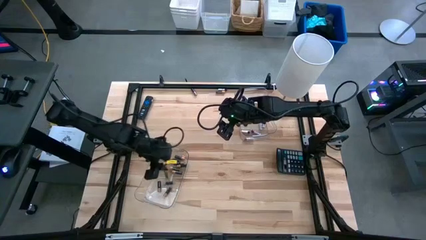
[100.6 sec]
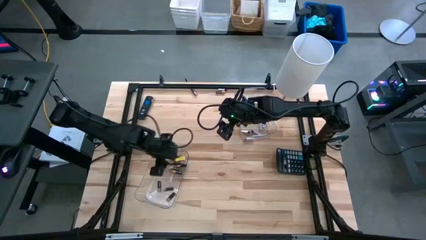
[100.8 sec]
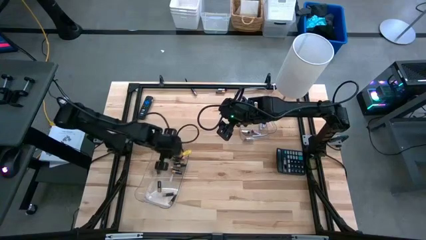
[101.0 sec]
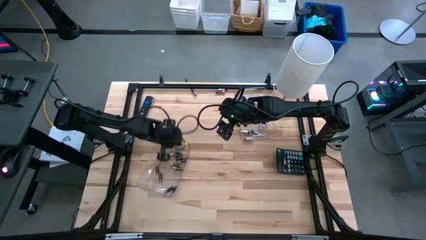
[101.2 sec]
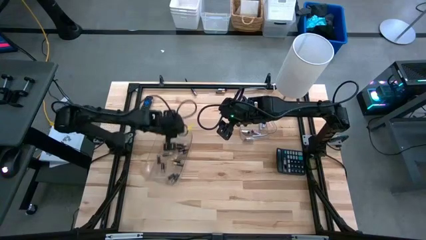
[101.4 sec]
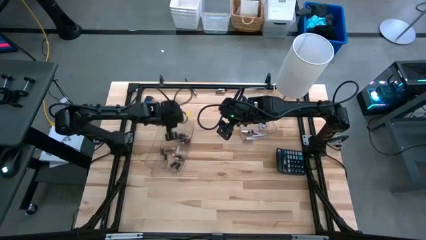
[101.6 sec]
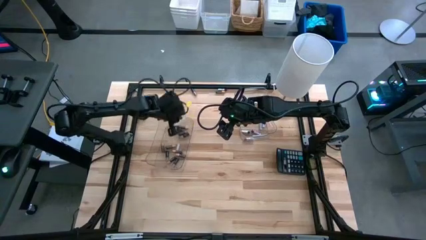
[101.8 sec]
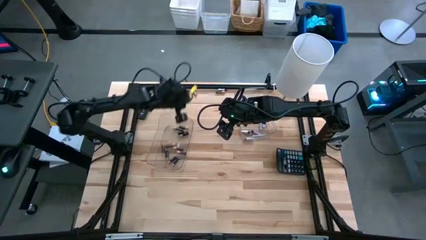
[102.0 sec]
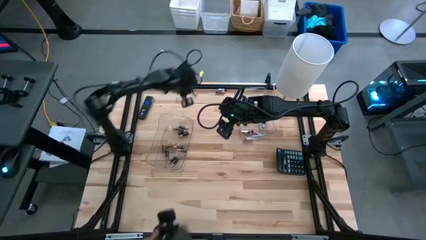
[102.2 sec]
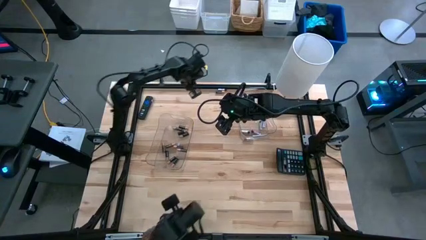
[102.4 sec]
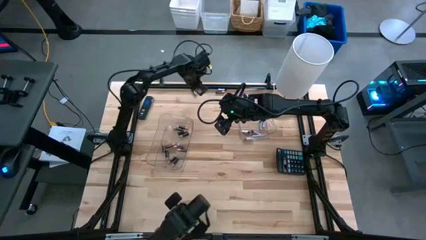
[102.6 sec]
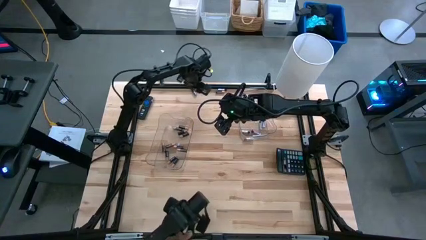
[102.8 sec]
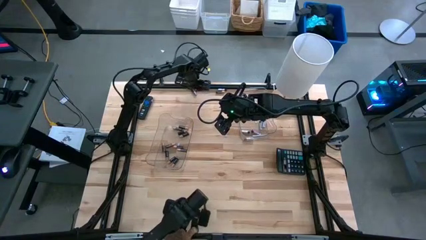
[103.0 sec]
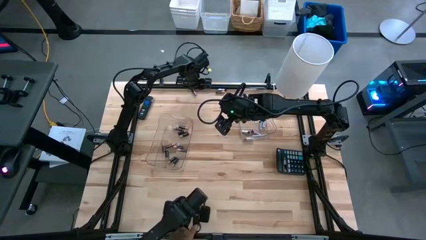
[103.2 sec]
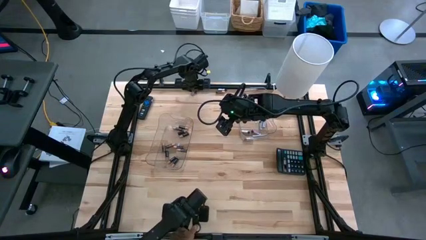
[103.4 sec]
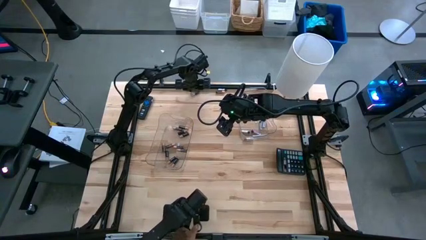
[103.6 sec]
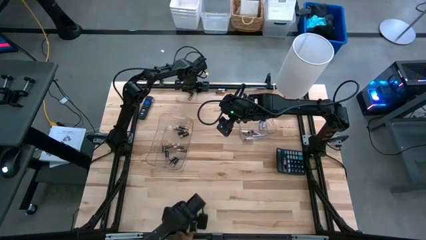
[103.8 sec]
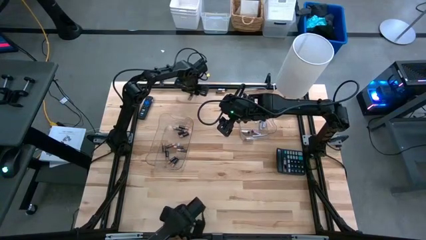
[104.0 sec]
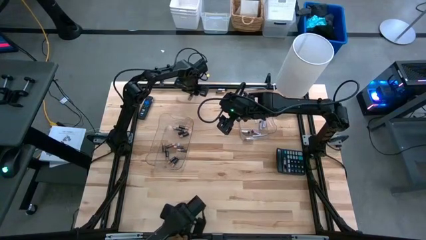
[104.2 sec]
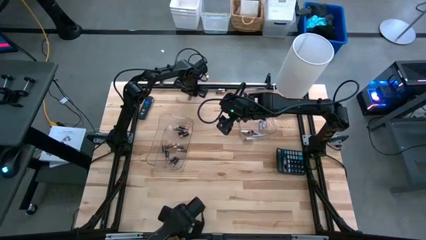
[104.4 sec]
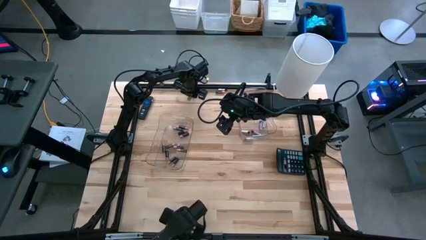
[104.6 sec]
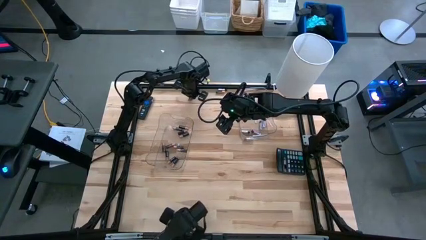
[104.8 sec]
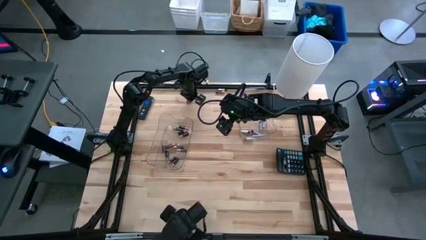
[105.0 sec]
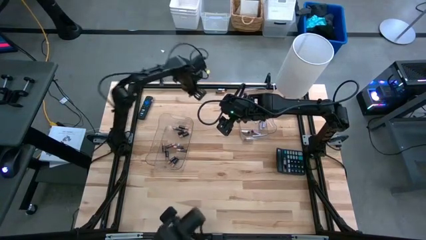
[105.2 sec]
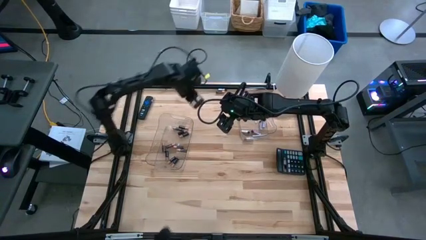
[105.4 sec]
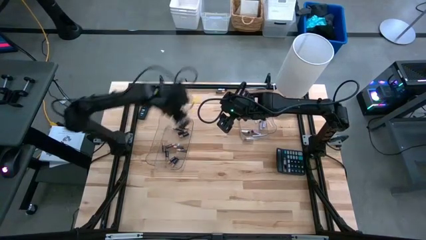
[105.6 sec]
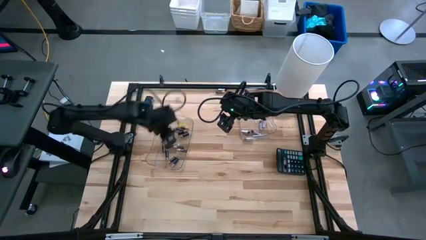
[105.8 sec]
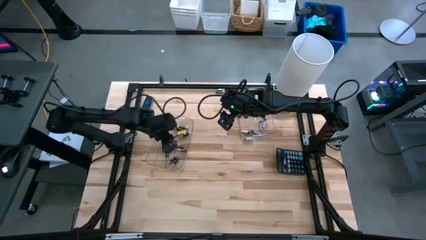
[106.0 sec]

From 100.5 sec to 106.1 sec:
Task: Sort batteries
Put the brown battery into the left transparent bin

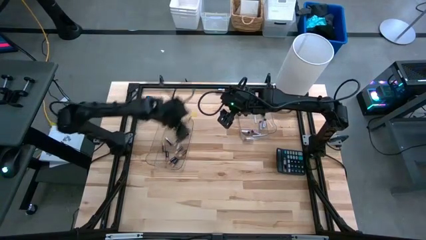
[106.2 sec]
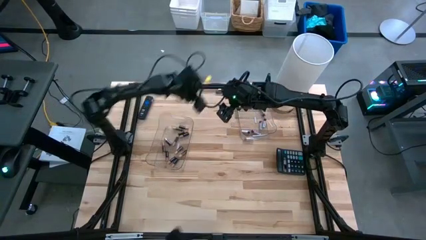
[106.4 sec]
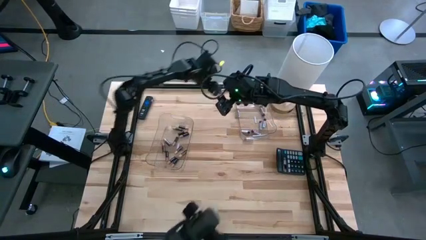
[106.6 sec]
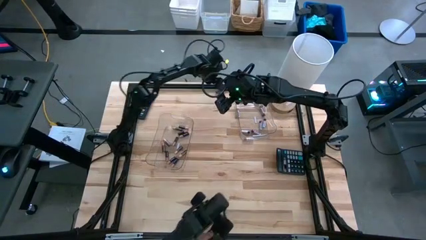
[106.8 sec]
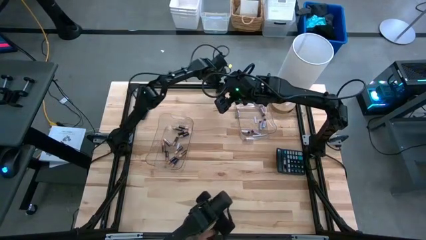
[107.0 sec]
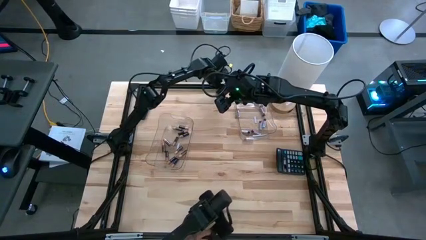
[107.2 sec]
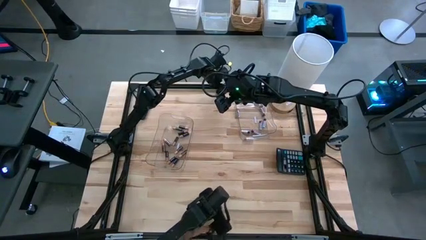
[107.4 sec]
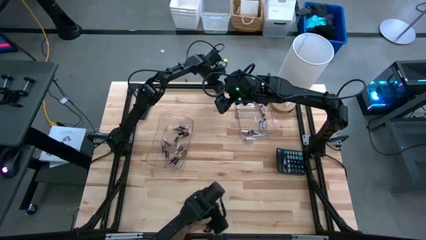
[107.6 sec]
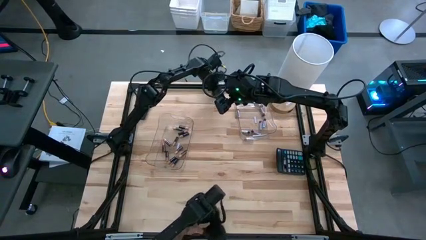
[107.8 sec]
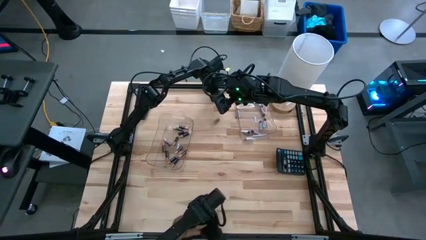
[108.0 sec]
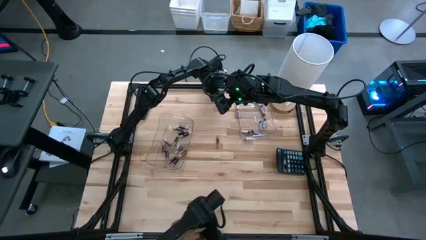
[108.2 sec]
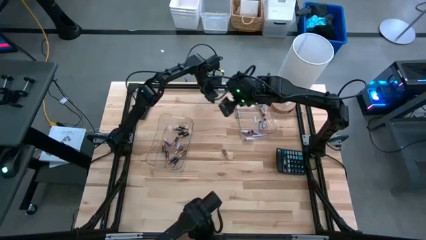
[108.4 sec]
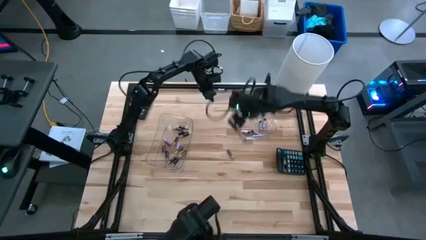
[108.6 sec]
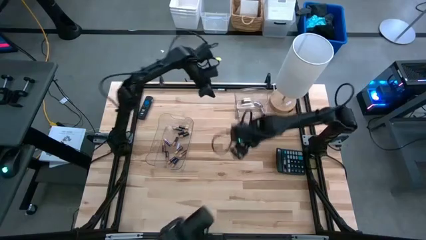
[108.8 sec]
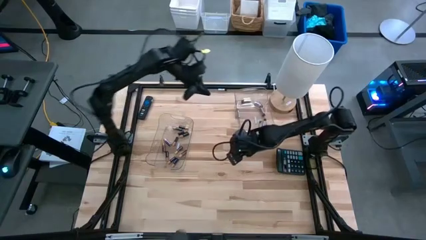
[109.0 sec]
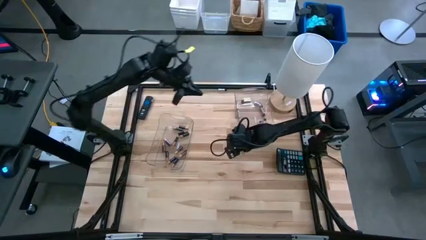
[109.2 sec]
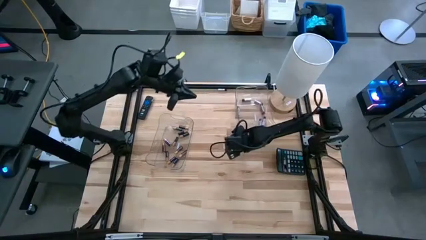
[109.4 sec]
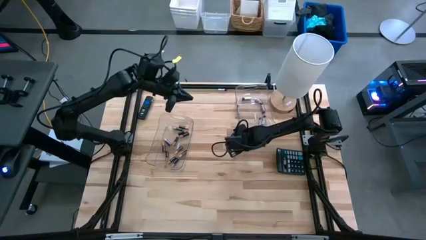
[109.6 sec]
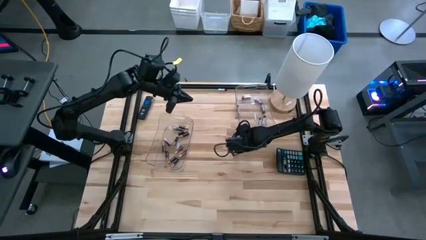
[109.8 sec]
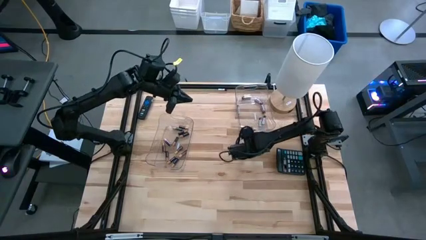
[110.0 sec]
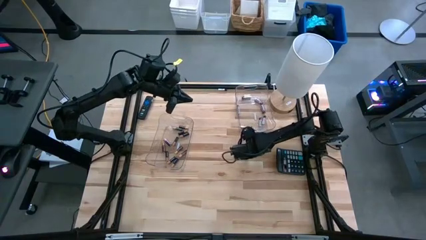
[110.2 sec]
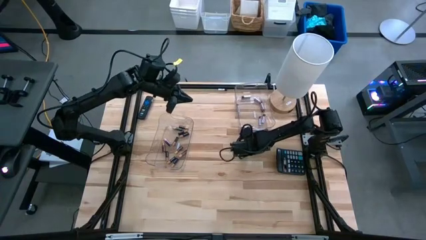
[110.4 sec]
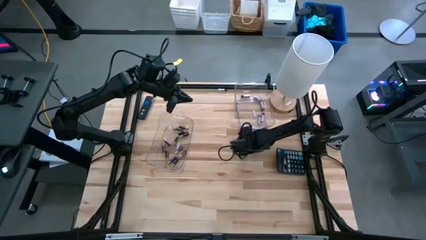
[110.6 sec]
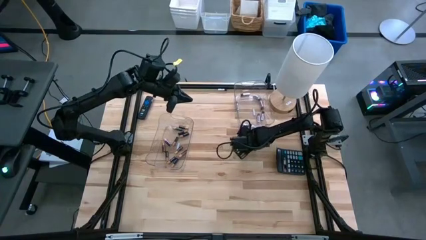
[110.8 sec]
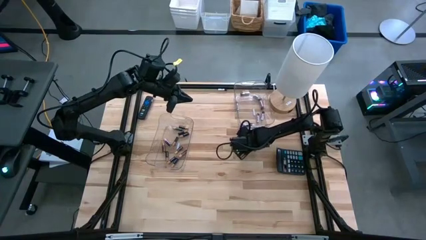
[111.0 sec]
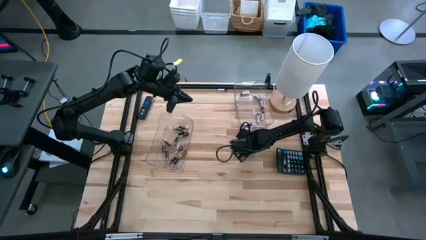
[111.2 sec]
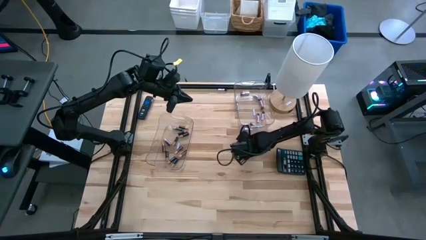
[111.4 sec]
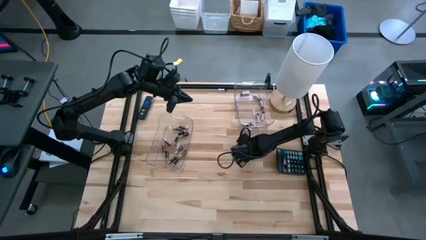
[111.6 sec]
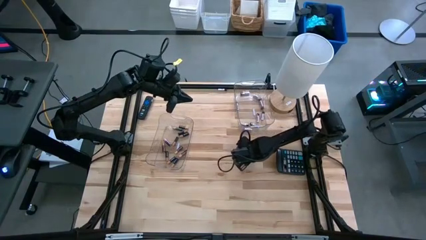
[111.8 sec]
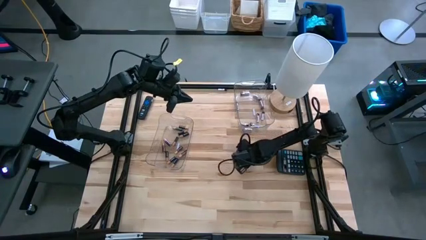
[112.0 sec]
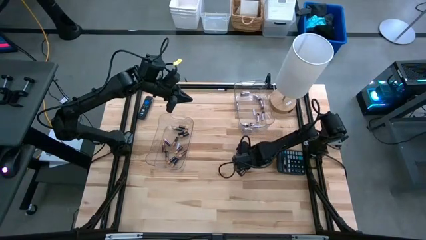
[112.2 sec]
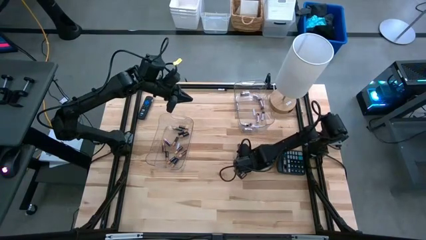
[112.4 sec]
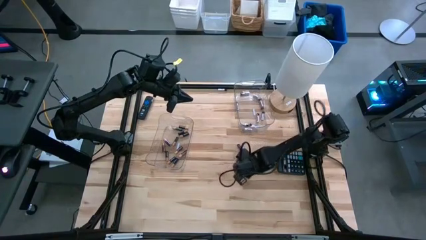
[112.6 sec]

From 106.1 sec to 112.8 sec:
Put the brown battery into the left transparent bin

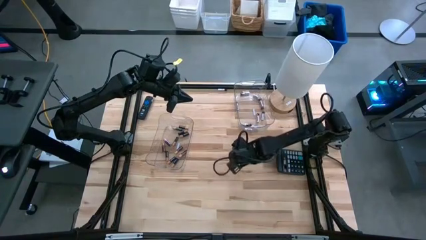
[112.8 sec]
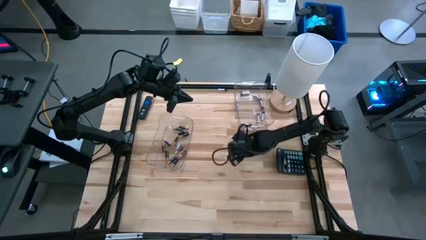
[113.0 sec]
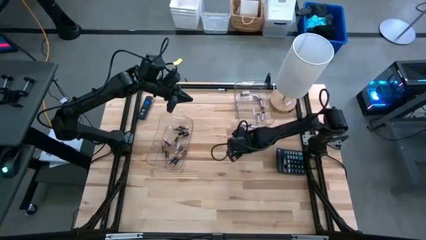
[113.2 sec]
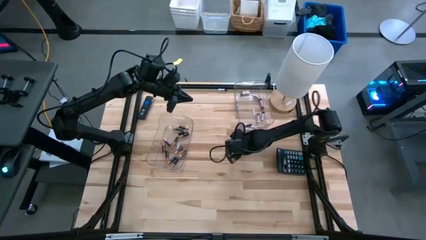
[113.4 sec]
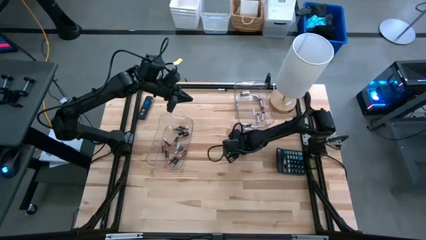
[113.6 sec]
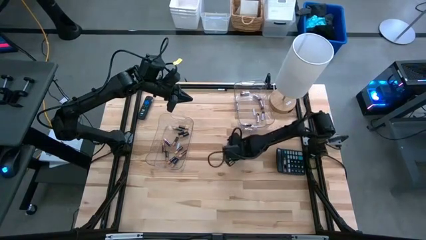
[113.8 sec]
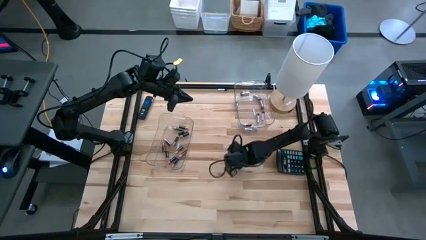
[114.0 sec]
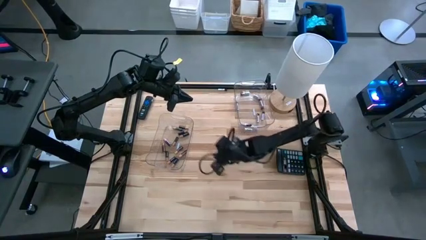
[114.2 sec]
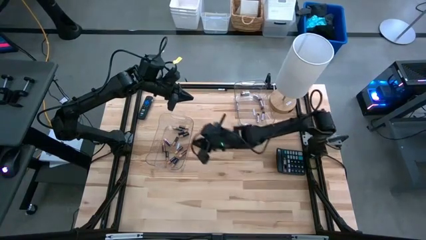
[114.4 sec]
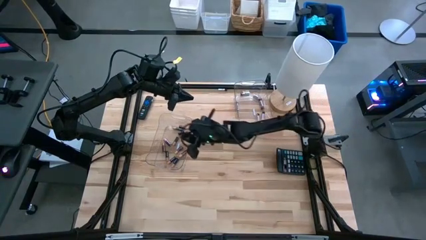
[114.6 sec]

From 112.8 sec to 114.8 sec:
Put the brown battery into the left transparent bin

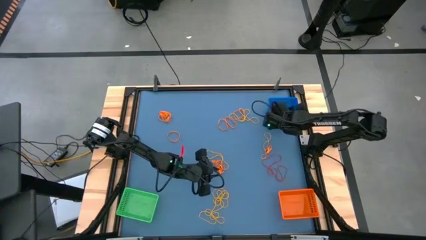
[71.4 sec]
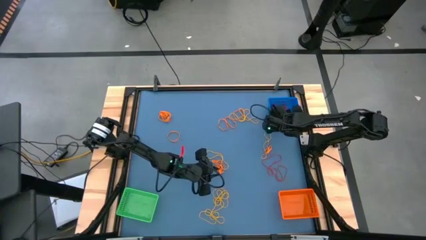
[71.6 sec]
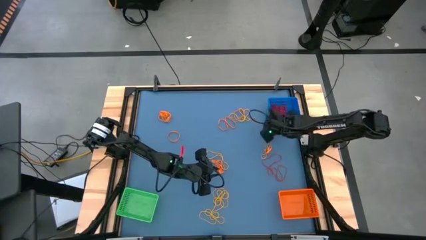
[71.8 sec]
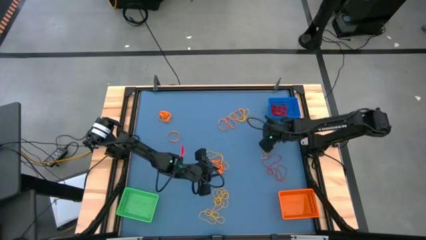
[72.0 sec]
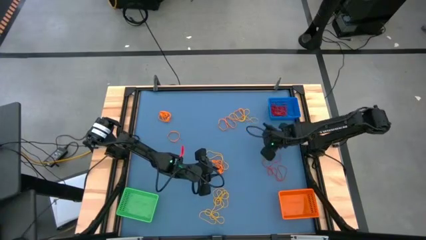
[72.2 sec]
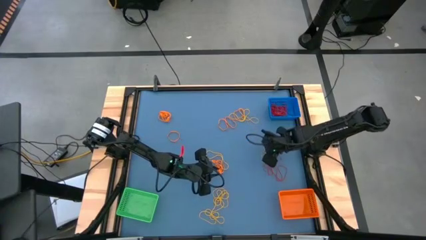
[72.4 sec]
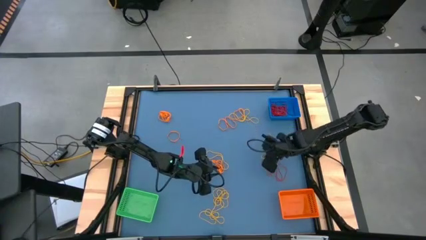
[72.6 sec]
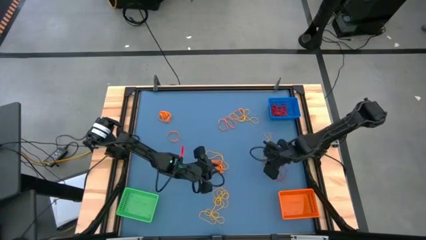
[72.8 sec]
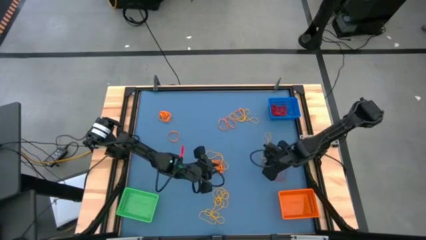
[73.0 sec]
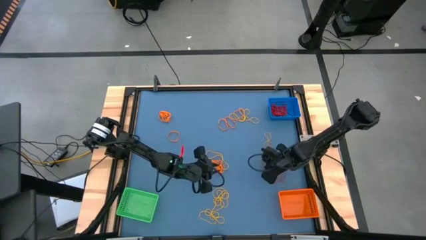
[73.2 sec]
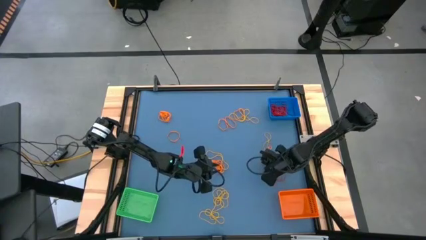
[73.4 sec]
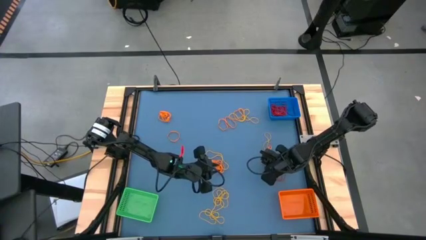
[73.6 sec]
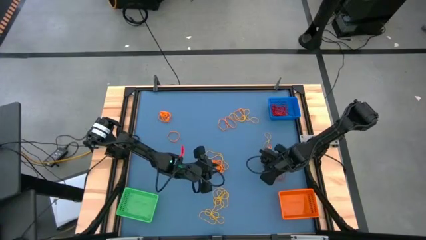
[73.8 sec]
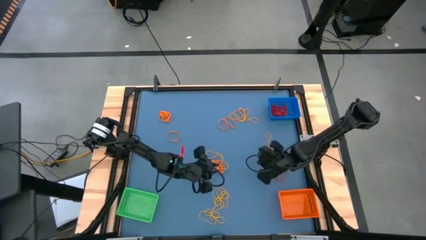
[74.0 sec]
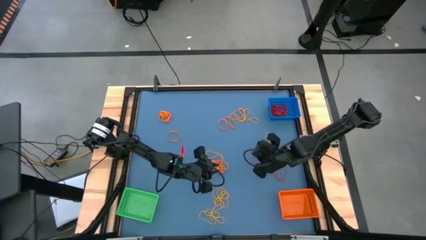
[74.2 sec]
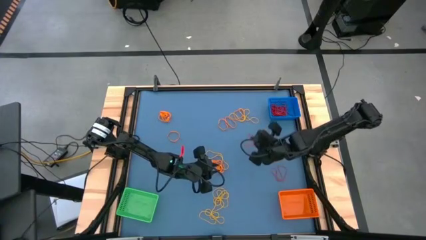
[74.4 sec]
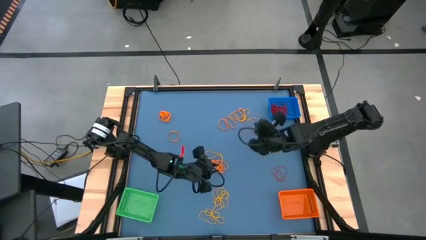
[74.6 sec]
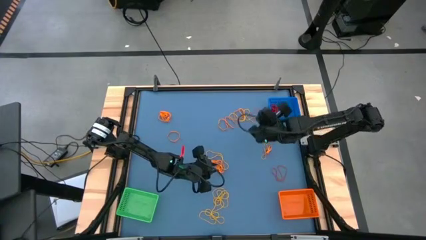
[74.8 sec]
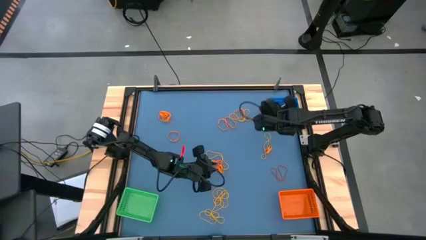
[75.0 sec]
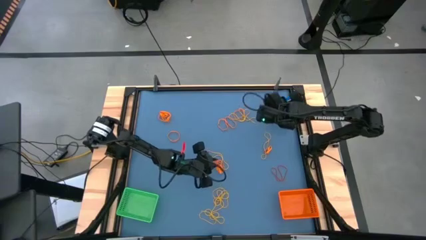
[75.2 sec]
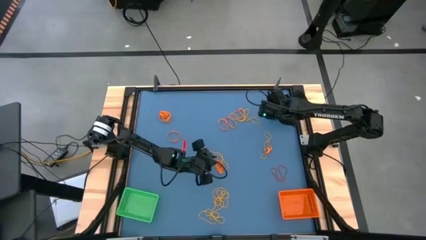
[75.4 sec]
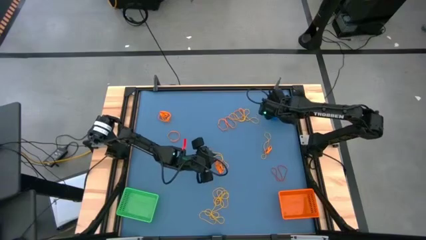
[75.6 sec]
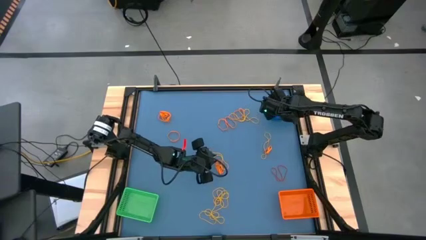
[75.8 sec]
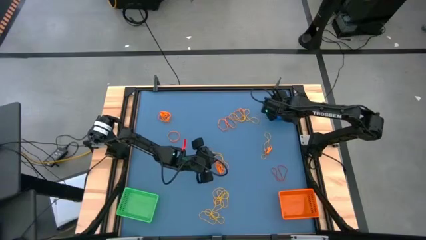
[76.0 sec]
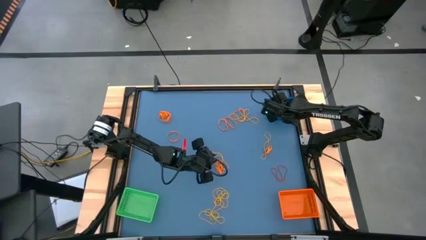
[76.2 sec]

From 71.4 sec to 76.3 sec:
Task: Sort rubber bands into baskets
Put the red rubber band into the blue bin
